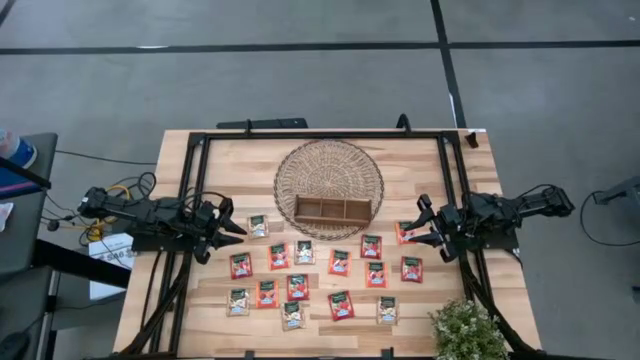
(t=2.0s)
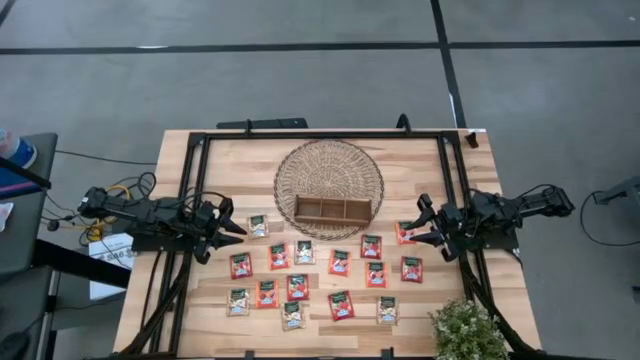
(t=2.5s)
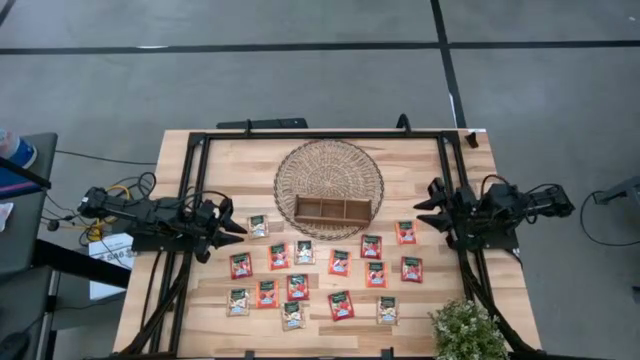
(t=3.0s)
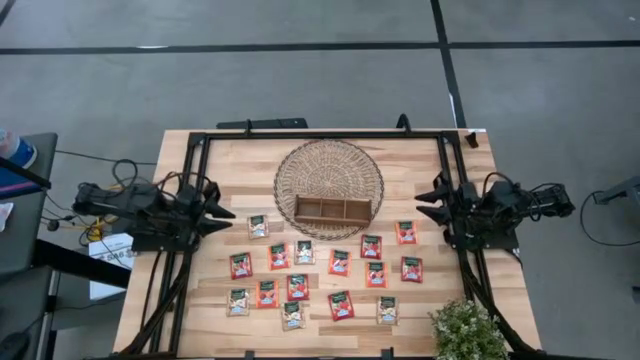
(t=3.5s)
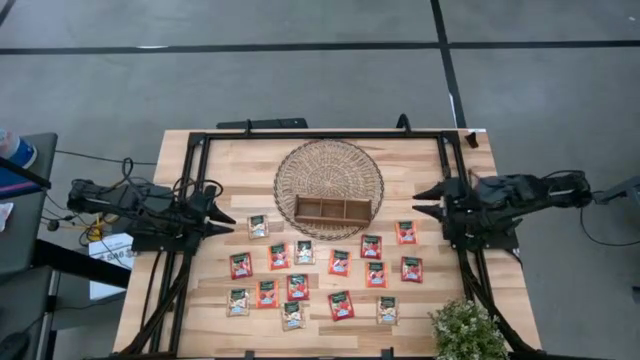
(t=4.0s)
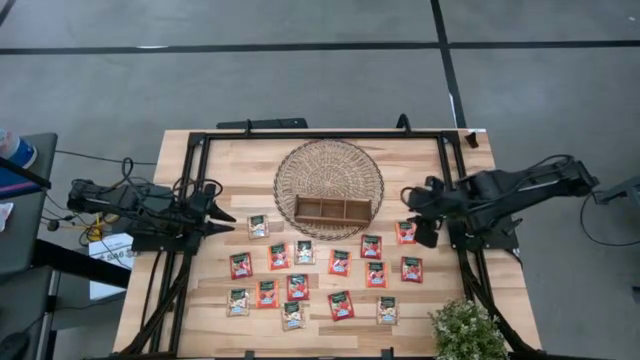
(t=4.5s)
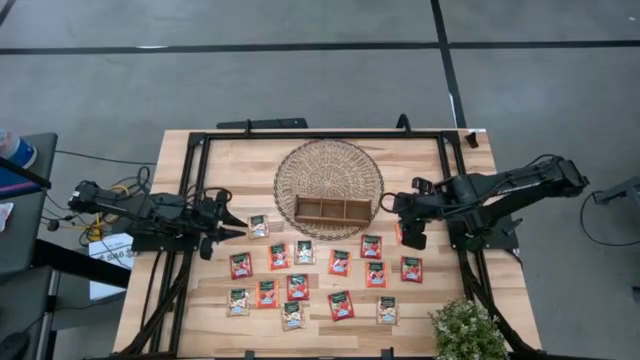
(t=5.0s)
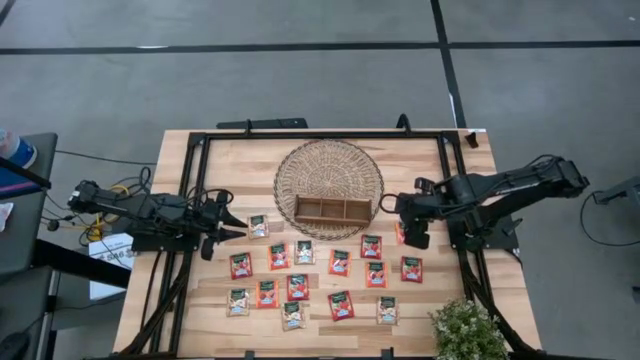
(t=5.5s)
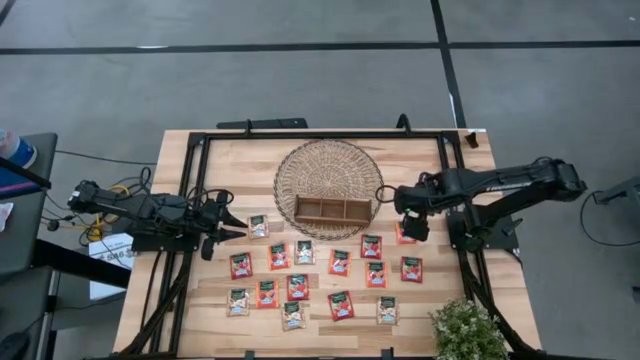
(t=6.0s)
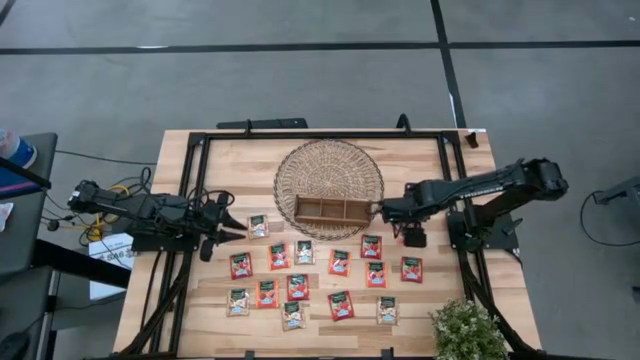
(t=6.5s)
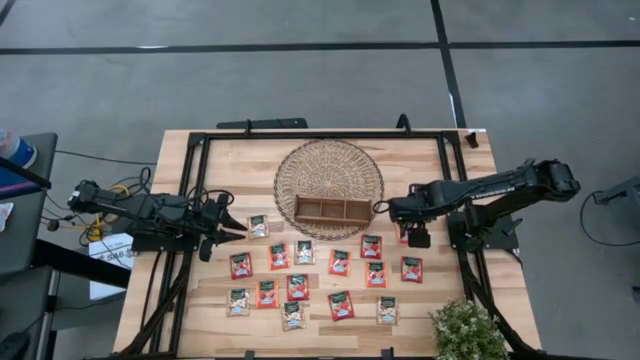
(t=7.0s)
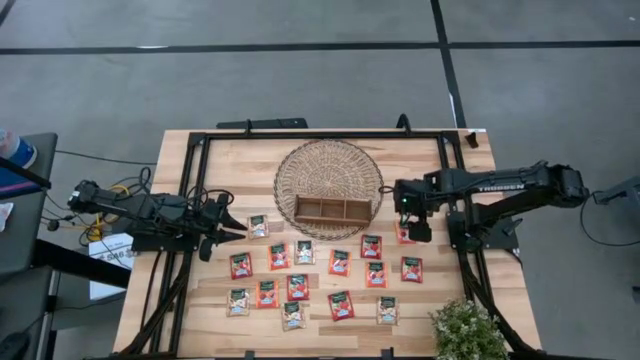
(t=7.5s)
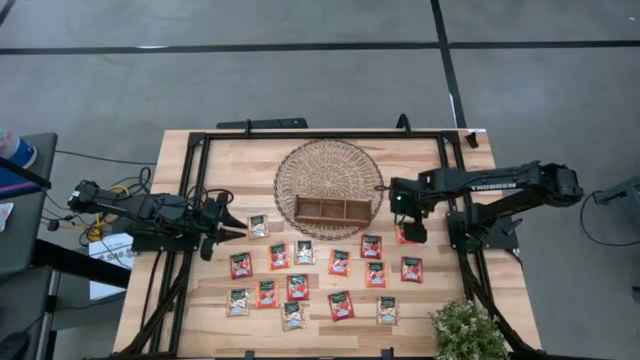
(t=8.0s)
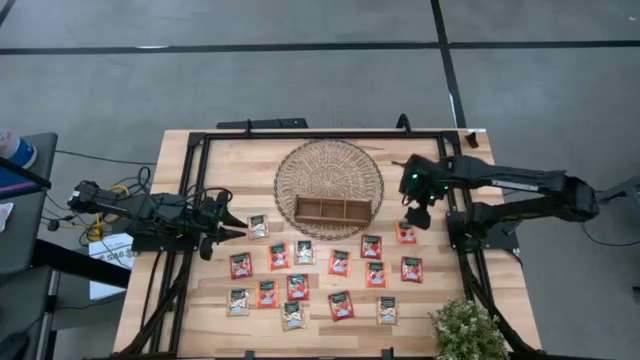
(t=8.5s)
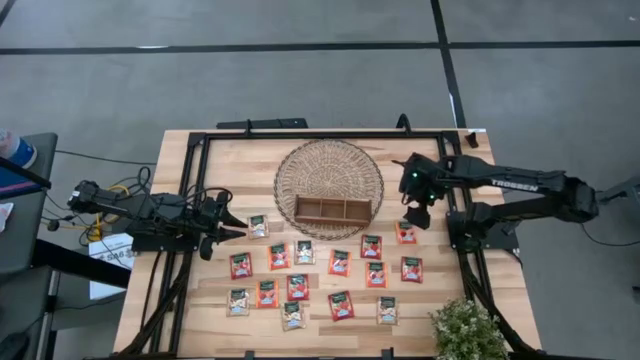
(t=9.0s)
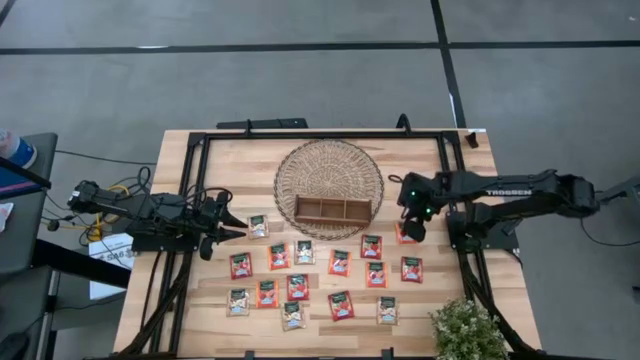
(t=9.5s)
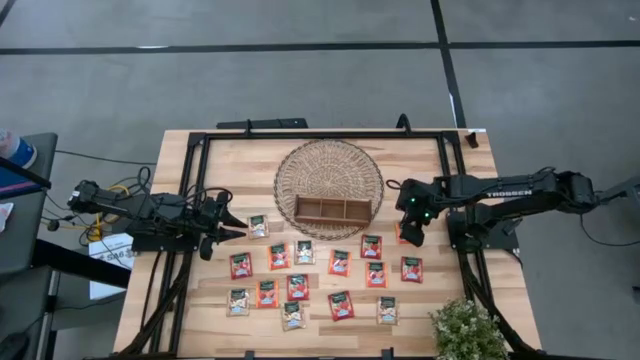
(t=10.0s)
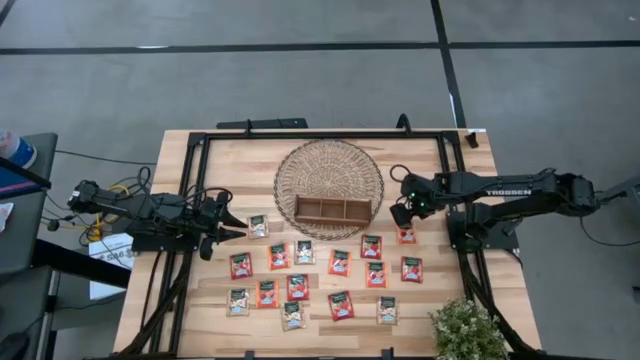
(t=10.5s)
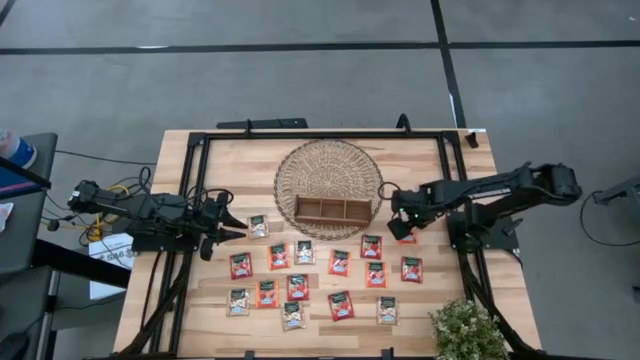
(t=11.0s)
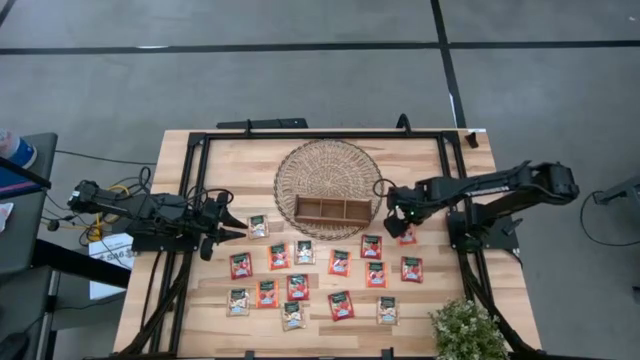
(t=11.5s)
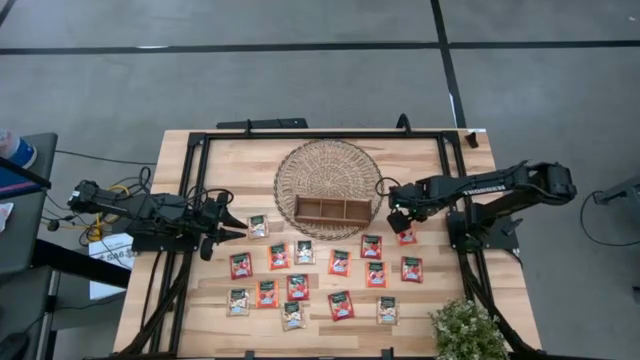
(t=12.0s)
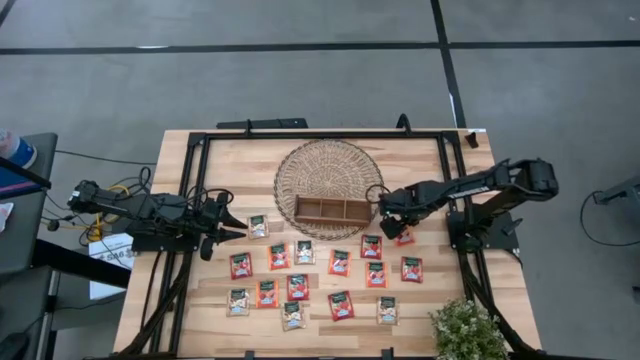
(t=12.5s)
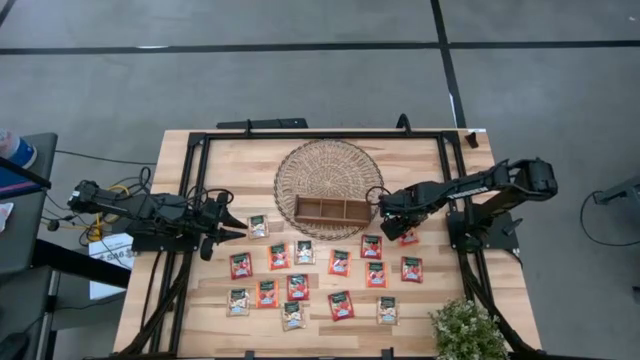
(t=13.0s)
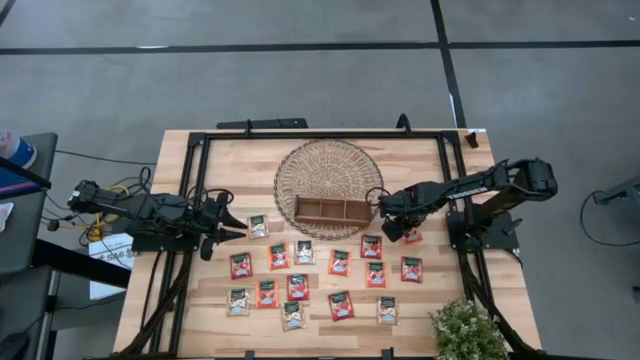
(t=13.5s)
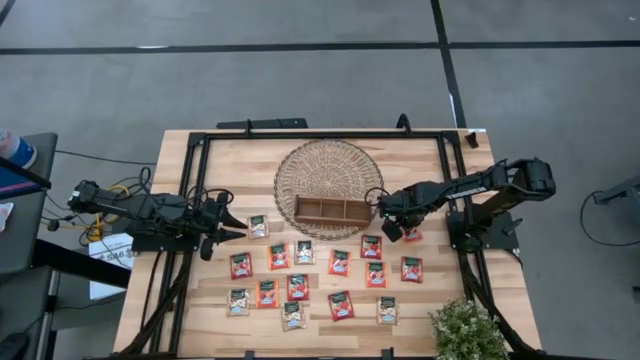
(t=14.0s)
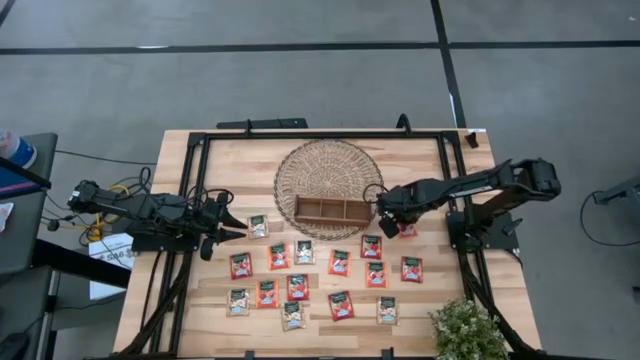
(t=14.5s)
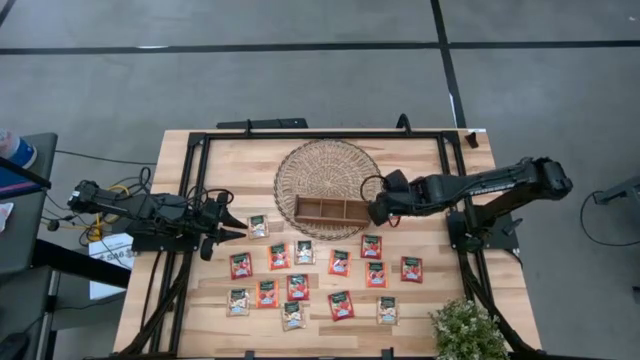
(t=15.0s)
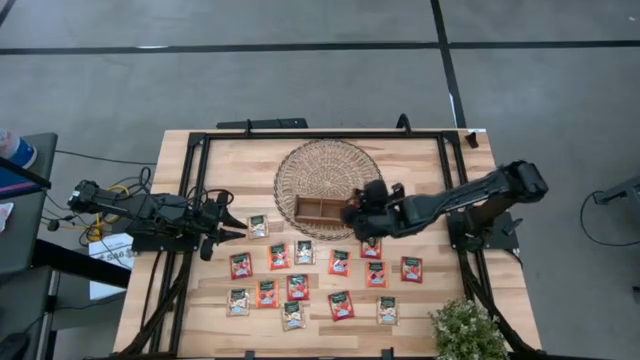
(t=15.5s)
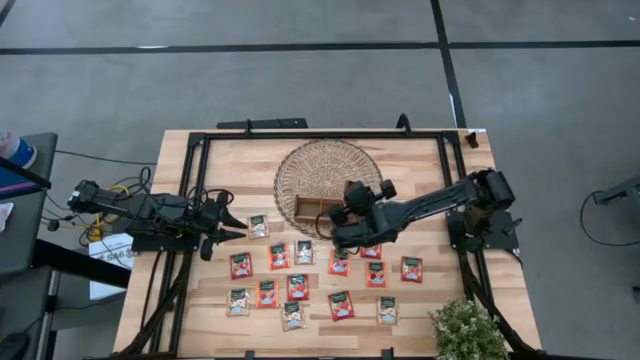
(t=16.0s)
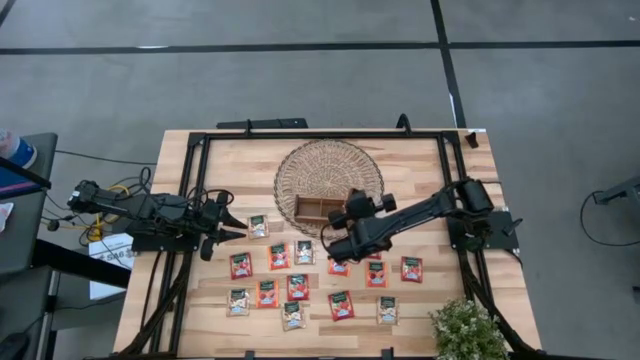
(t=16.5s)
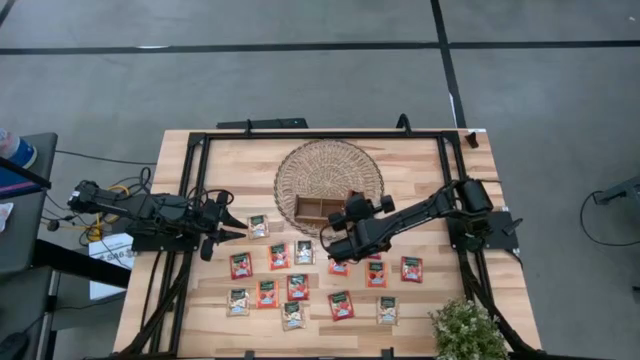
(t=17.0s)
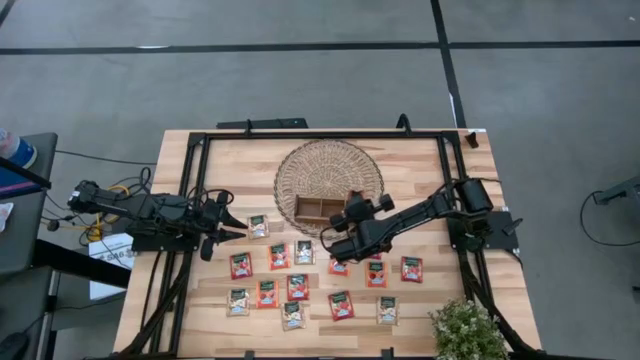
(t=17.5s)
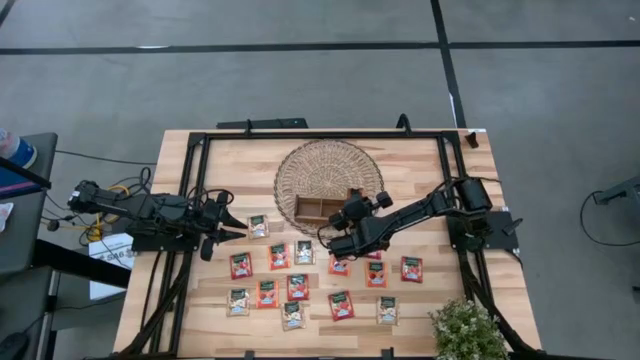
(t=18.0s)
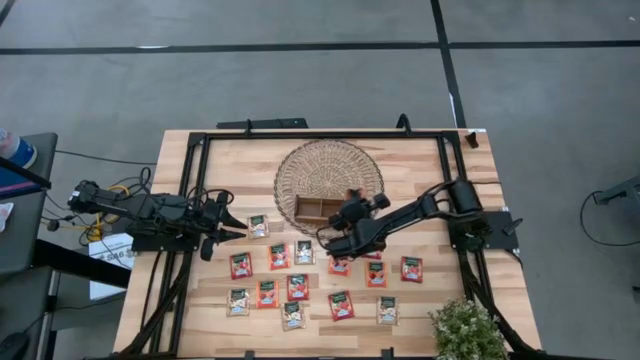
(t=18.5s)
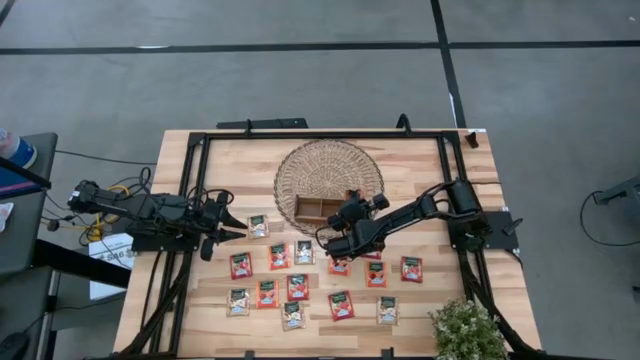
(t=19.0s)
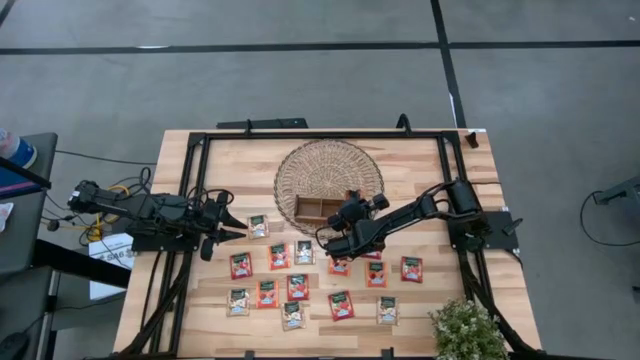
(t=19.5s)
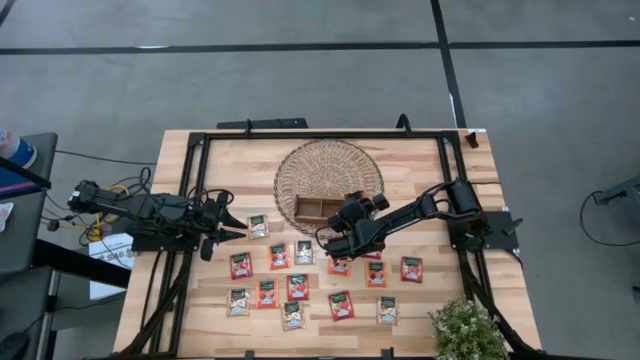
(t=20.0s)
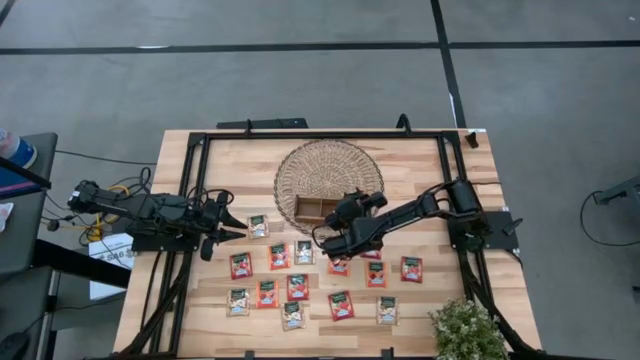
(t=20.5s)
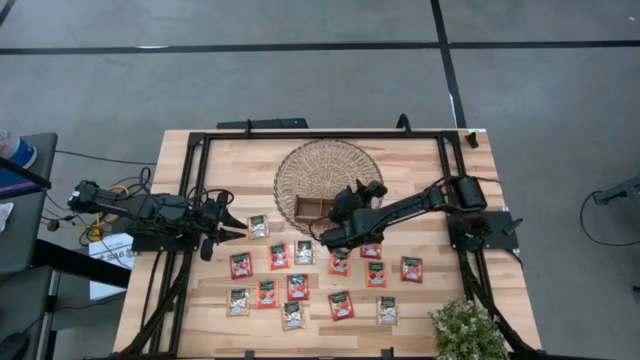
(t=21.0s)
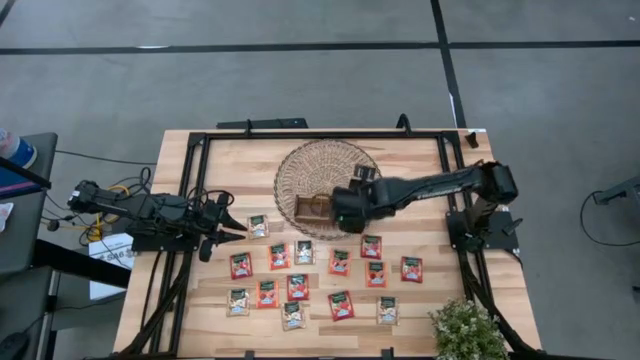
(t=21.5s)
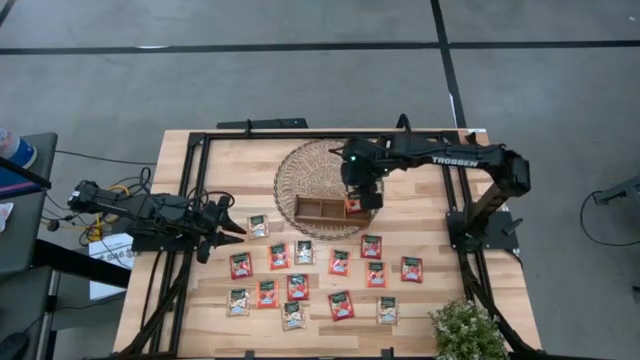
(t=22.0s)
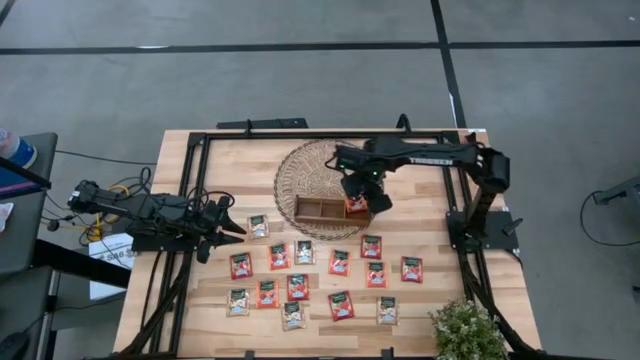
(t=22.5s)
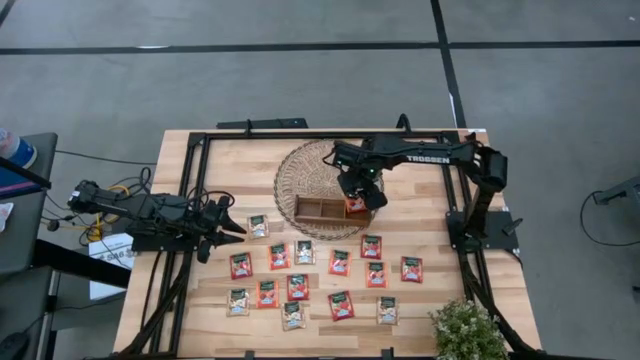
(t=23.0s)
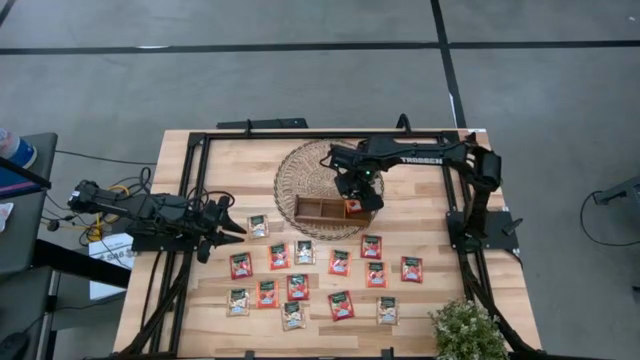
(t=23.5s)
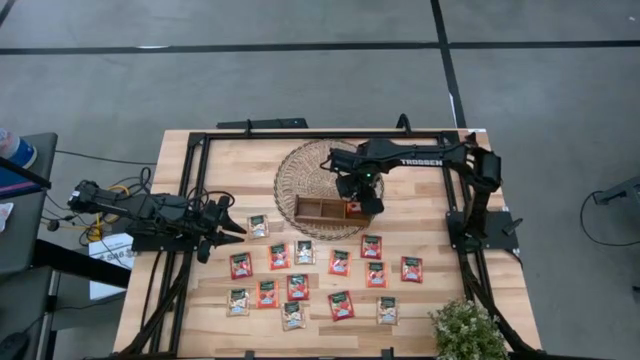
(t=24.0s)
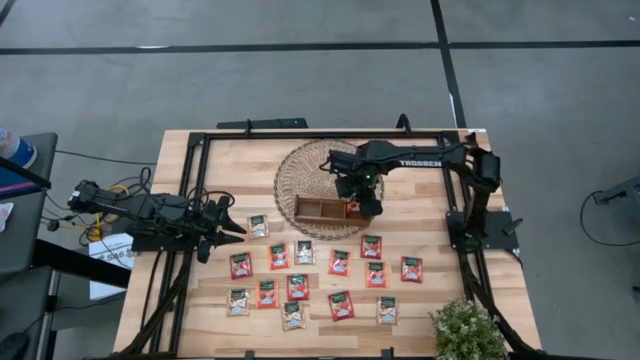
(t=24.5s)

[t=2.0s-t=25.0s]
Task: Pick & Place Tea
Put the orange tea bag into the right section of the wooden organizer
